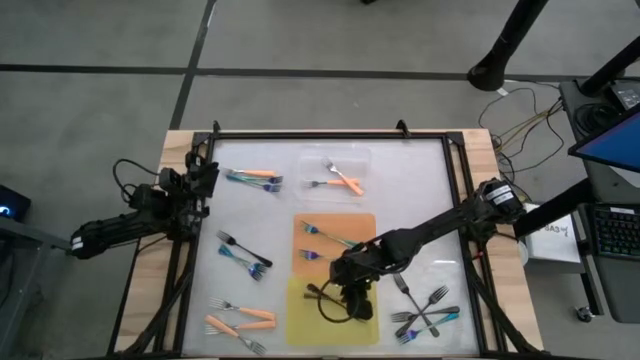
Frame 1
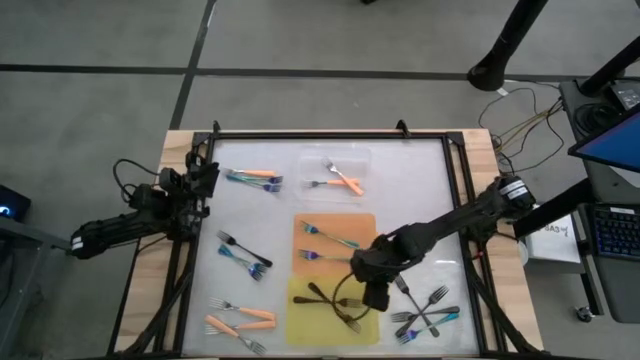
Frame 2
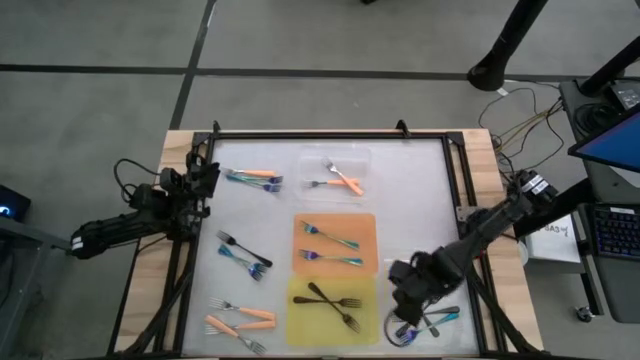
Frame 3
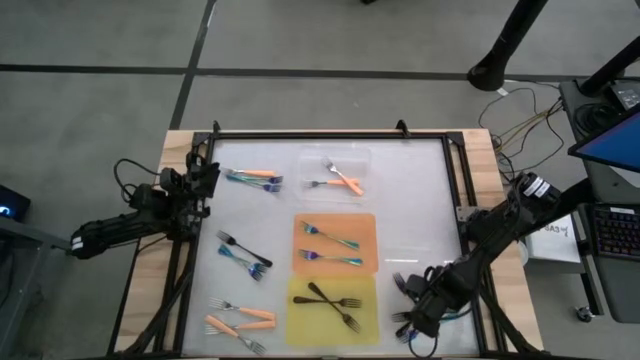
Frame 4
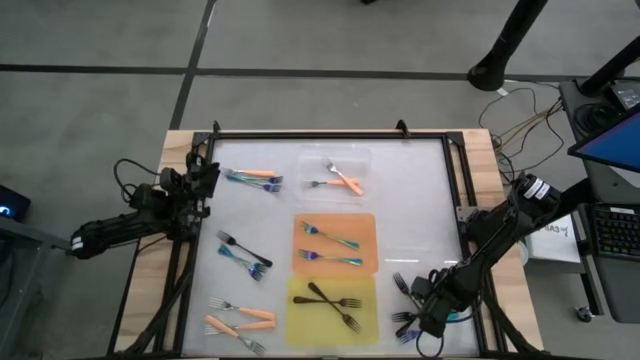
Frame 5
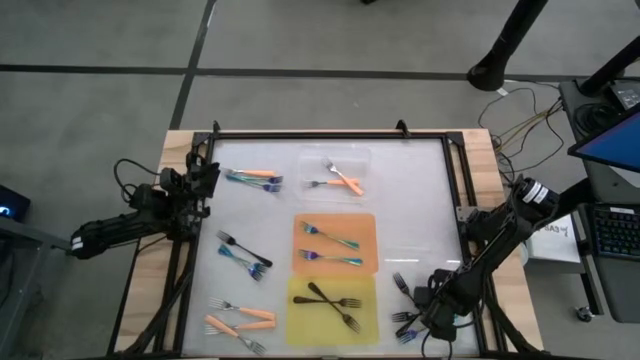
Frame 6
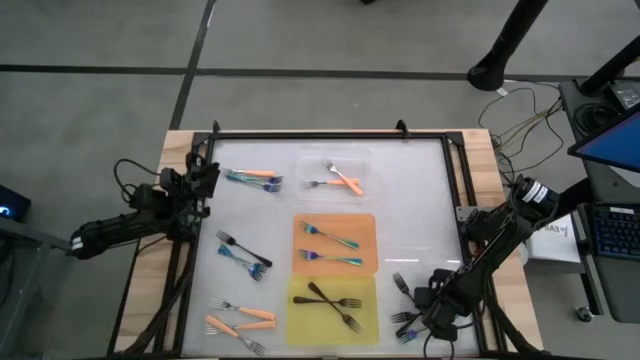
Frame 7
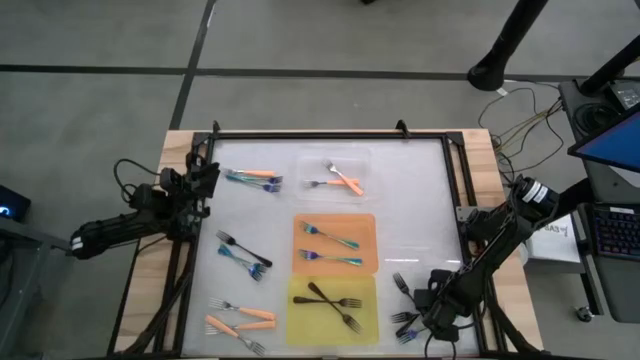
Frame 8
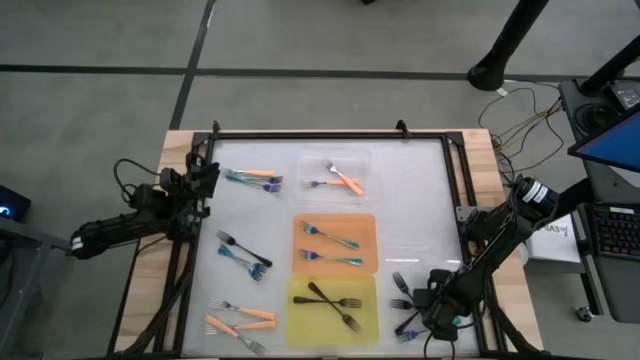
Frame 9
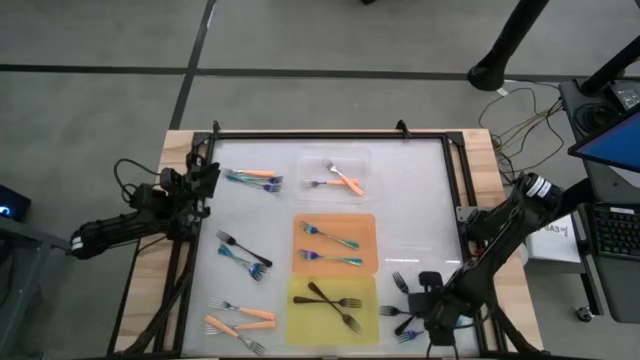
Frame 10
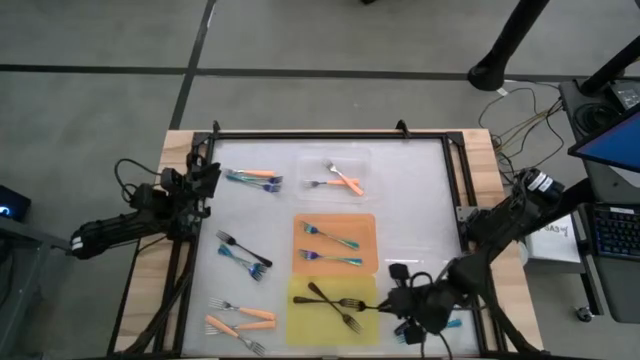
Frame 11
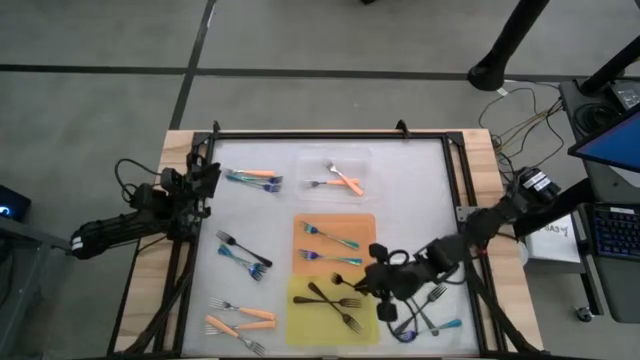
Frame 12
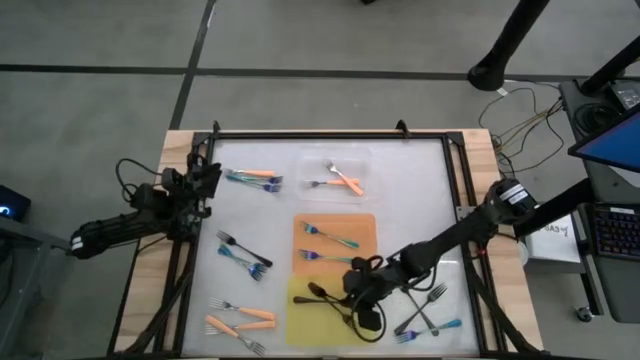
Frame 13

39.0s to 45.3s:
Task: Sort silverware by color (type)
Put the black fork into the yellow bin

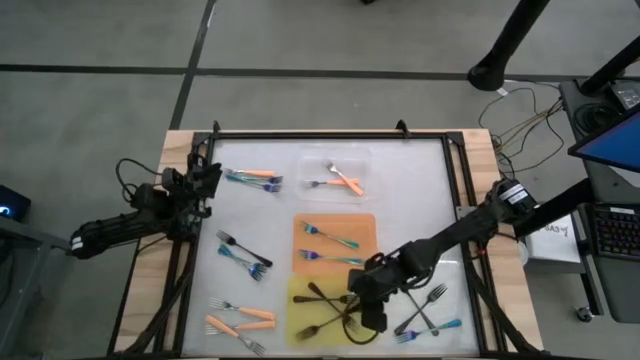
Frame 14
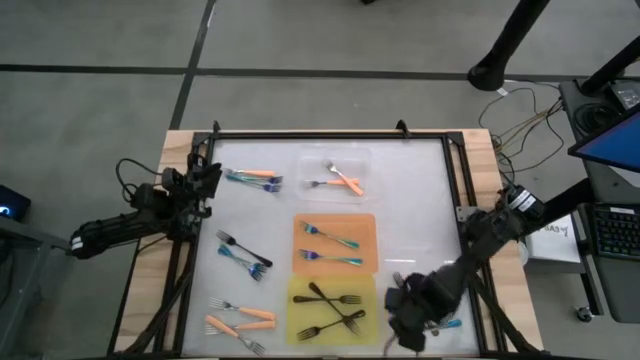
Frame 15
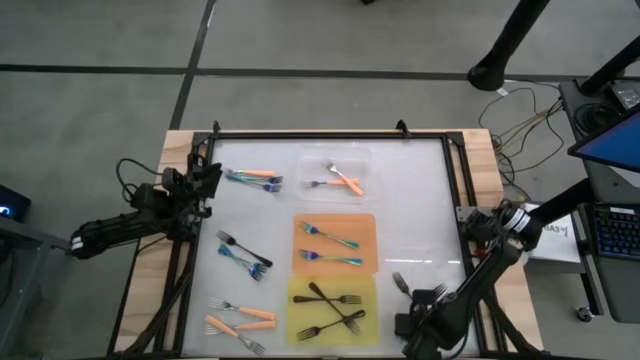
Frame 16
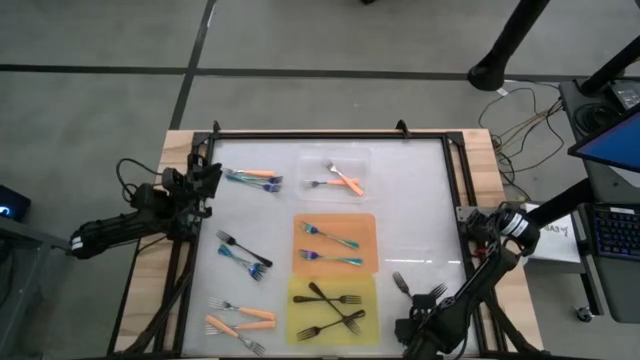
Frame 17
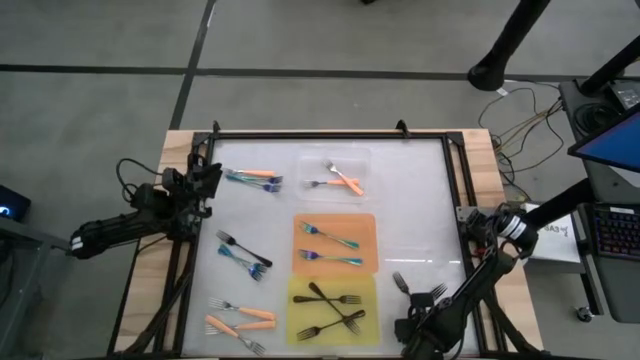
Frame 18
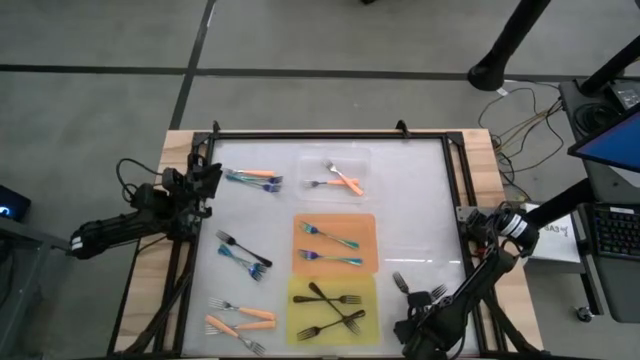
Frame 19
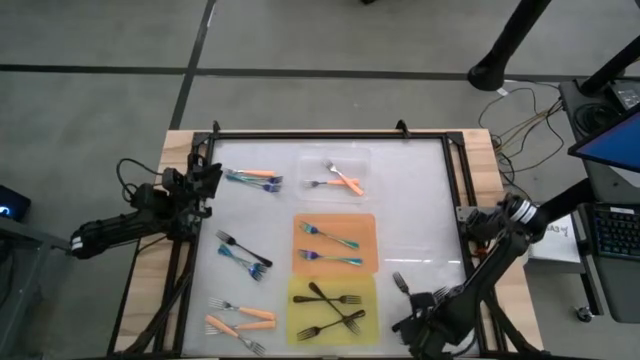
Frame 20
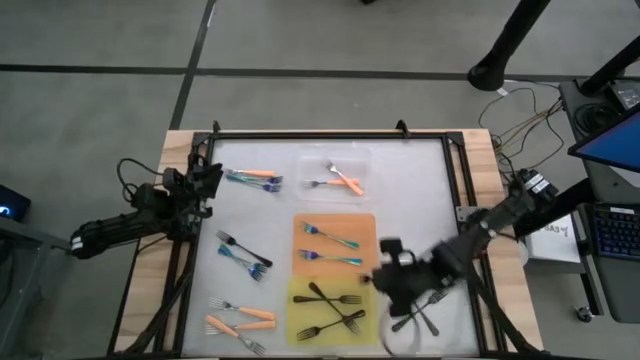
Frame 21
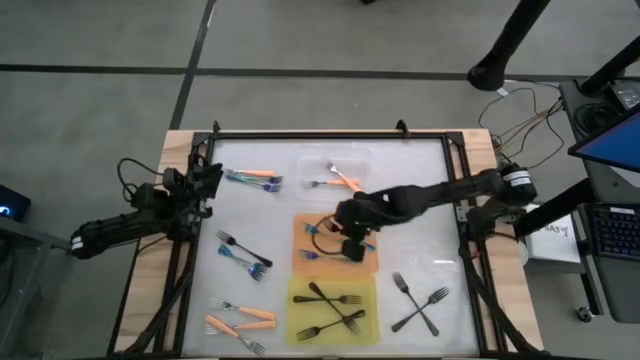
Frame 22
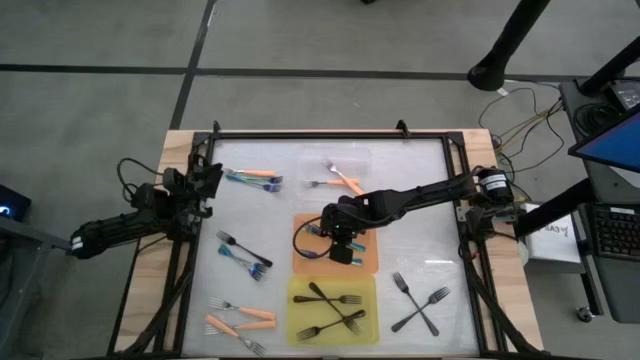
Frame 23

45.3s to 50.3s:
Put the blue fork into the orange bin

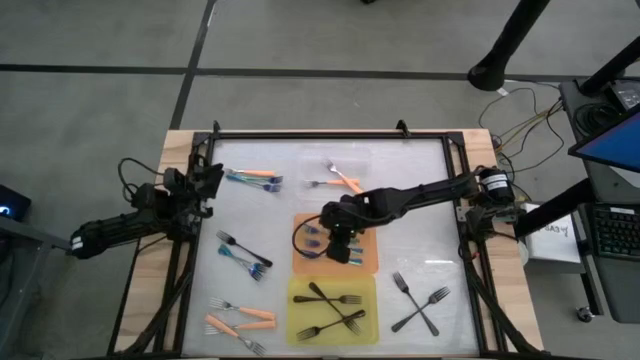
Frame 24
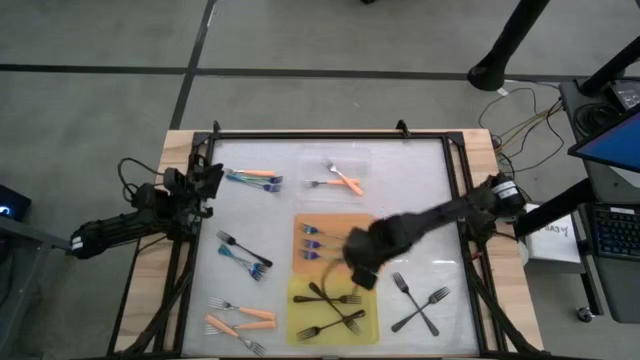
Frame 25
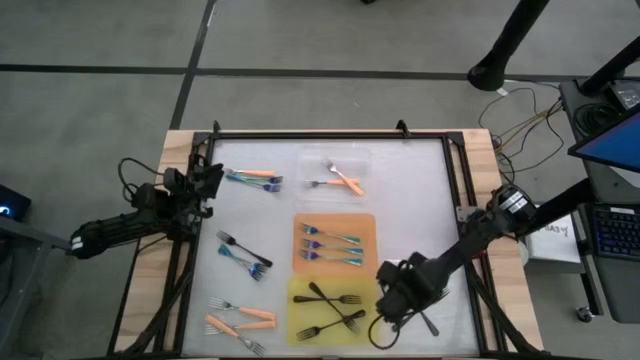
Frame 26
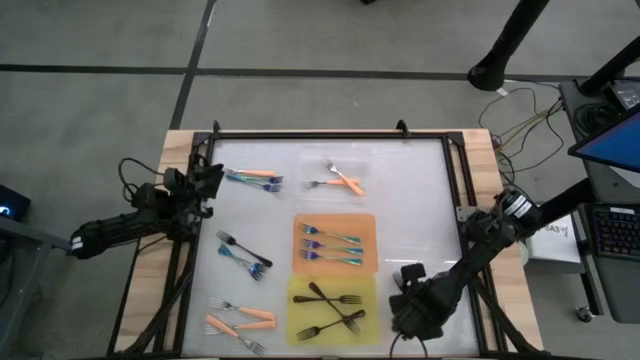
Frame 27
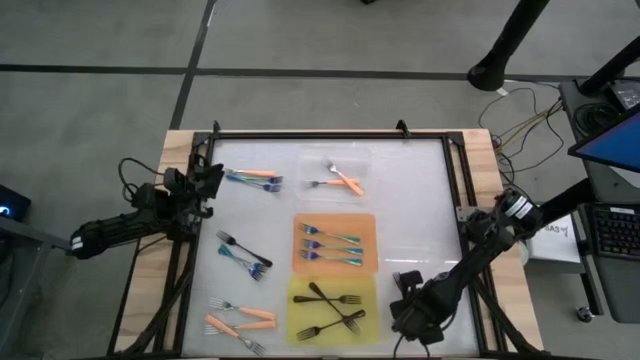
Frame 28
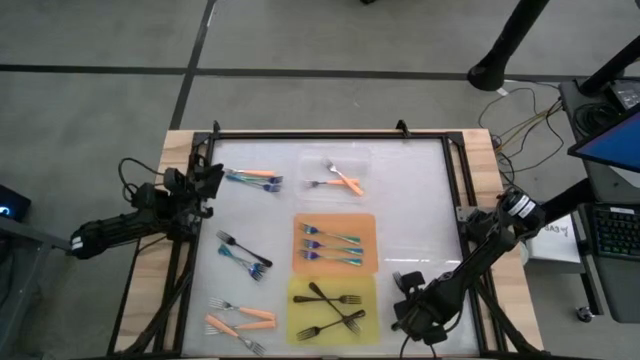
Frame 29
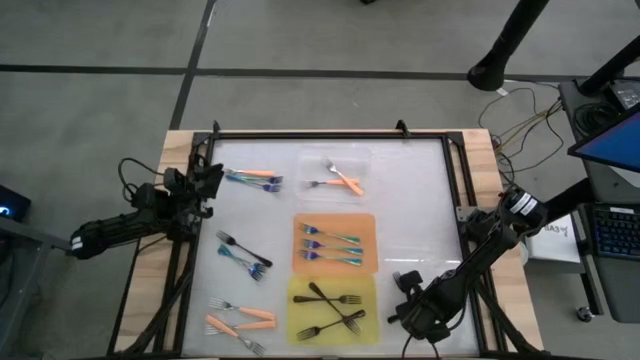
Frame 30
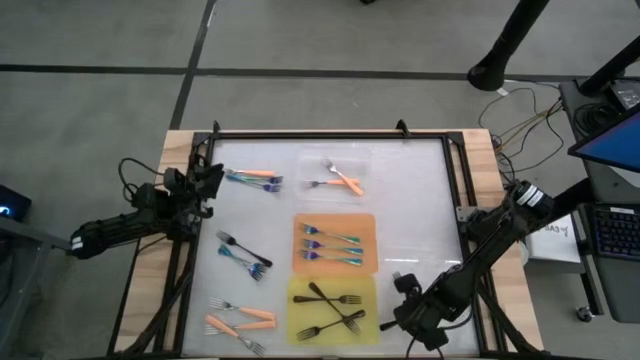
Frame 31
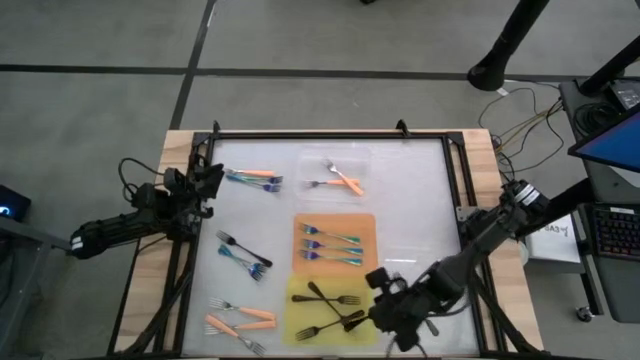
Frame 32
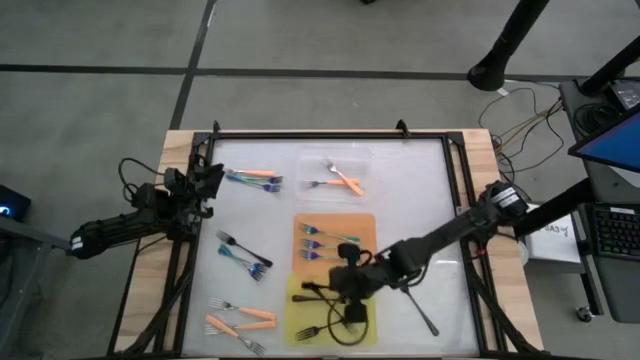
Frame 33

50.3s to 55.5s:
Put the black fork into the yellow bin

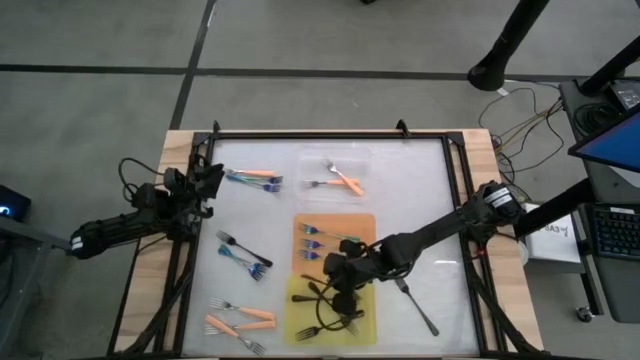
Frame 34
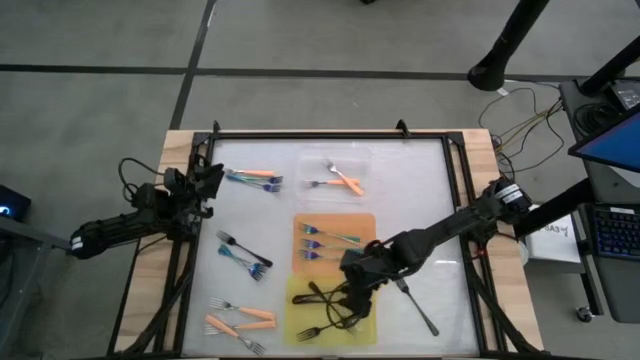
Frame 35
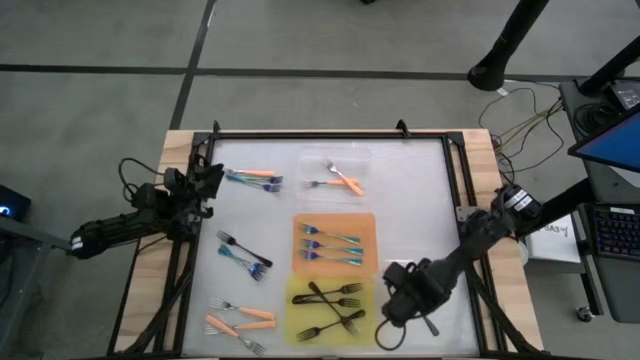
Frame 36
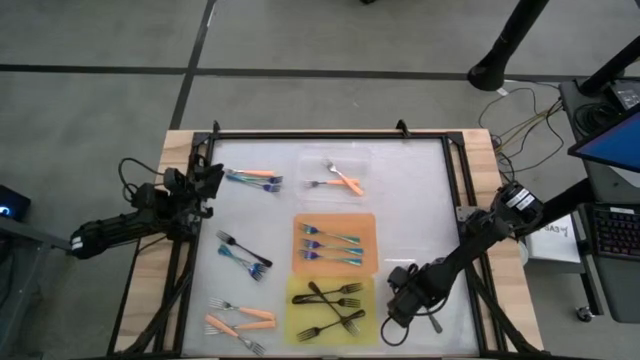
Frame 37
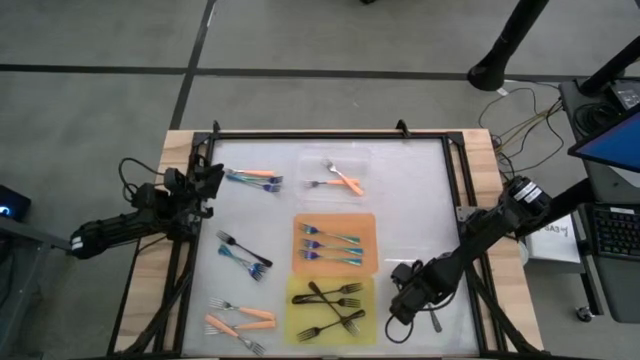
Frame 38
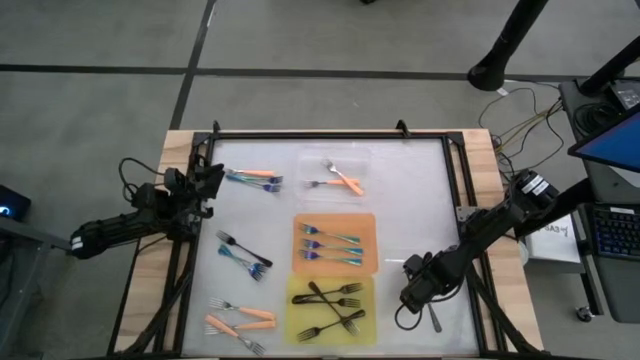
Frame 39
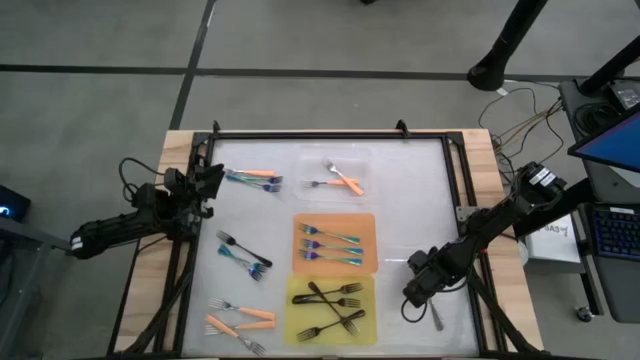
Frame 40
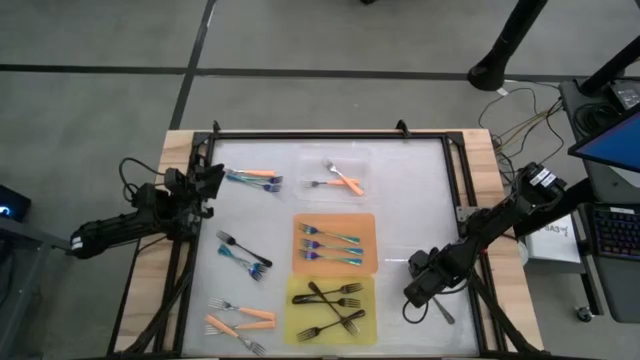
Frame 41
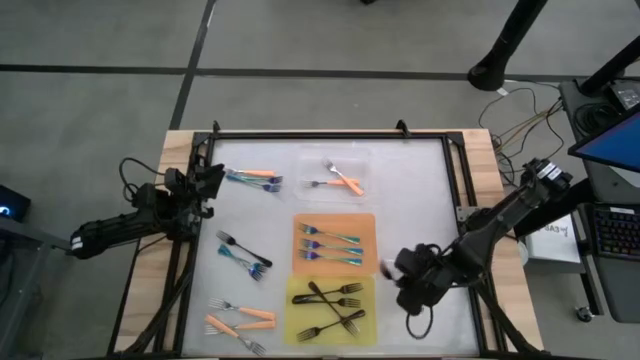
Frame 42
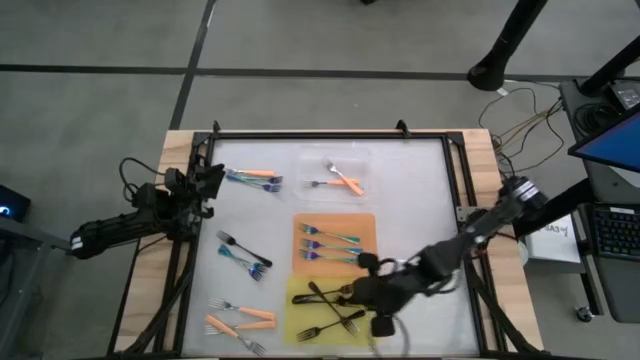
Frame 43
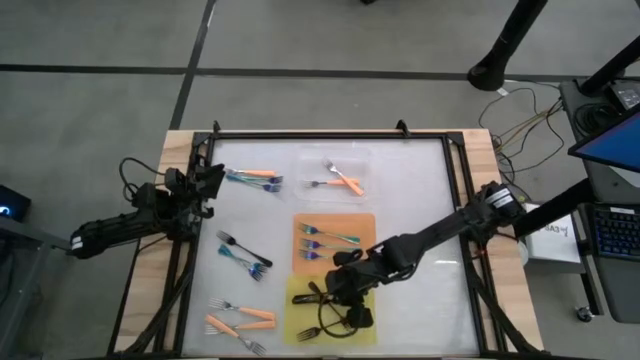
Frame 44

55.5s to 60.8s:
Put the black fork into the yellow bin
